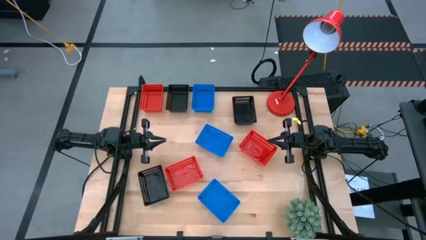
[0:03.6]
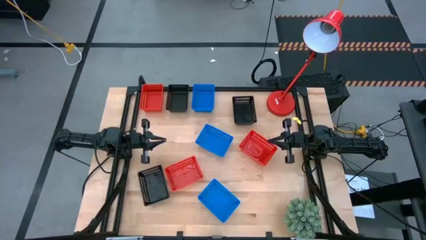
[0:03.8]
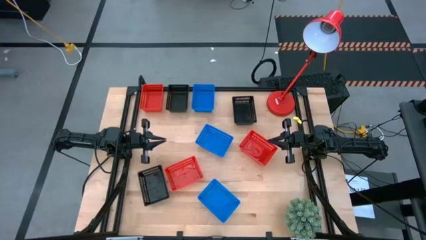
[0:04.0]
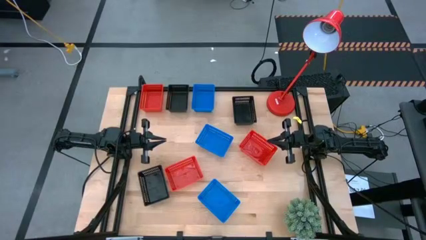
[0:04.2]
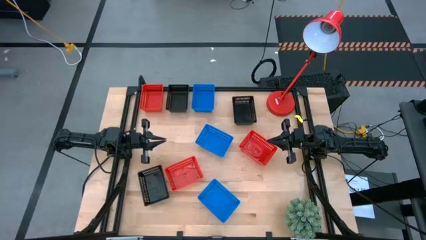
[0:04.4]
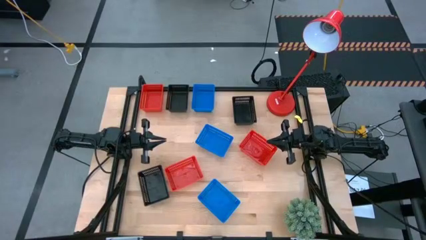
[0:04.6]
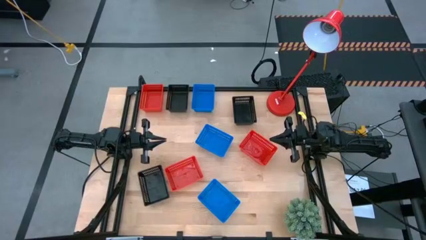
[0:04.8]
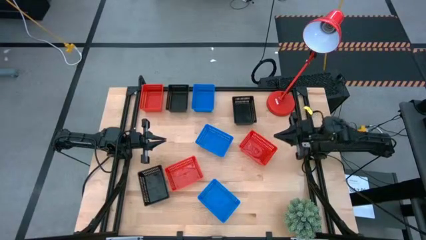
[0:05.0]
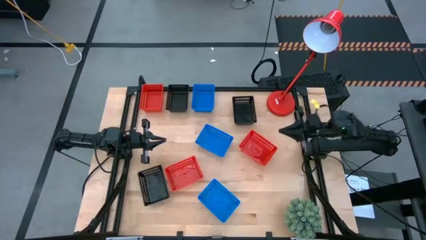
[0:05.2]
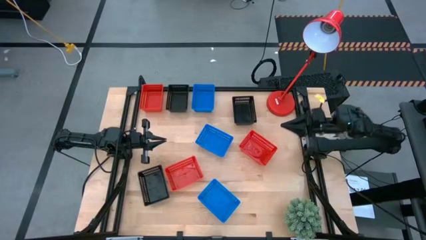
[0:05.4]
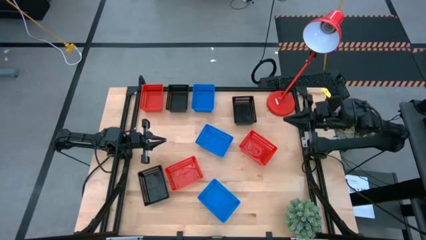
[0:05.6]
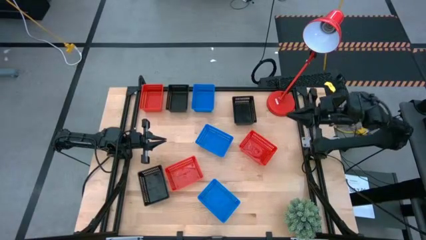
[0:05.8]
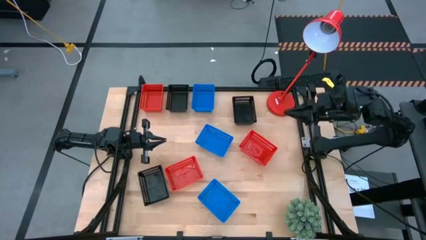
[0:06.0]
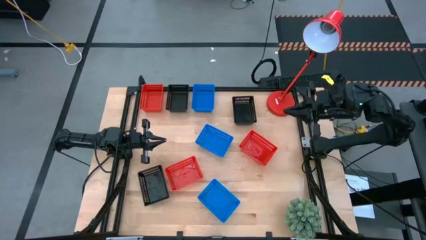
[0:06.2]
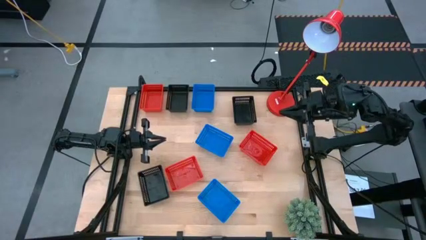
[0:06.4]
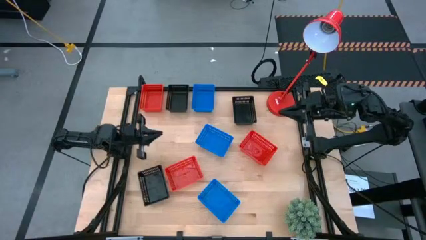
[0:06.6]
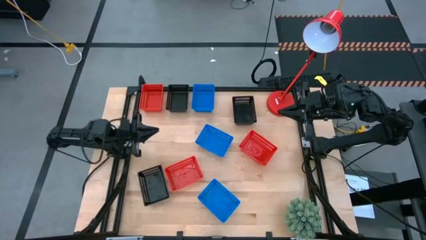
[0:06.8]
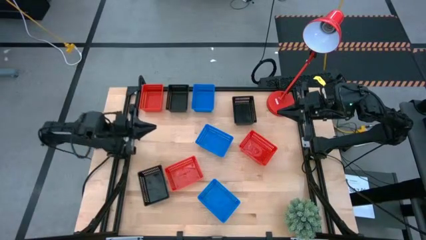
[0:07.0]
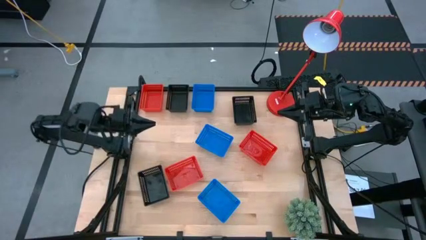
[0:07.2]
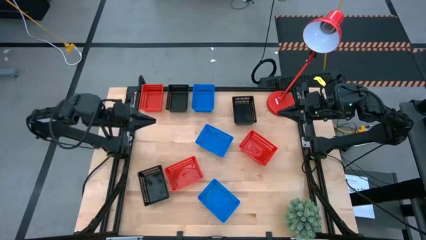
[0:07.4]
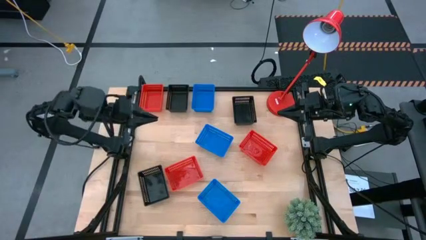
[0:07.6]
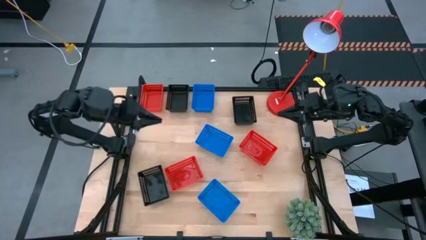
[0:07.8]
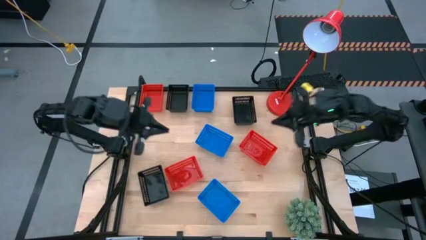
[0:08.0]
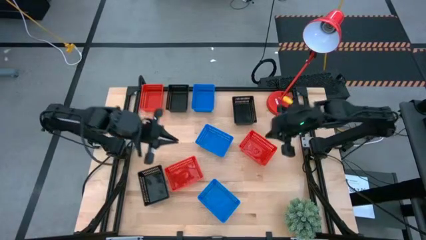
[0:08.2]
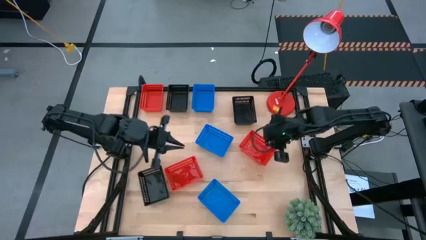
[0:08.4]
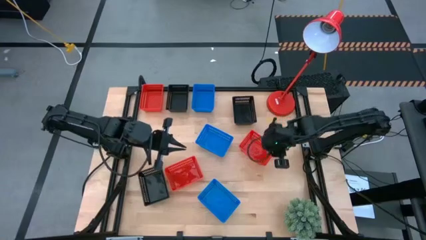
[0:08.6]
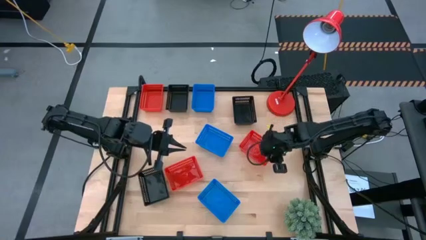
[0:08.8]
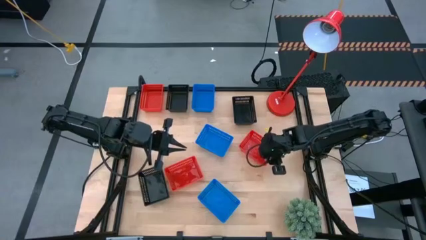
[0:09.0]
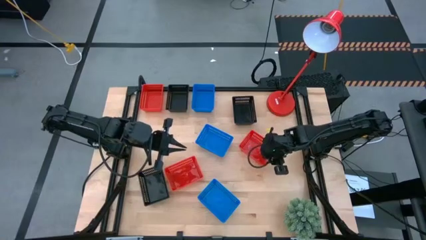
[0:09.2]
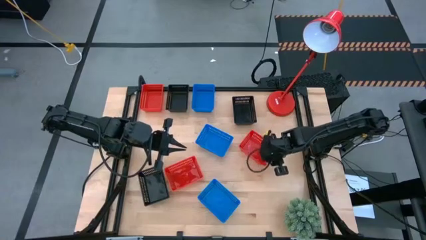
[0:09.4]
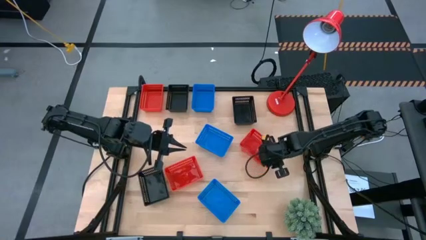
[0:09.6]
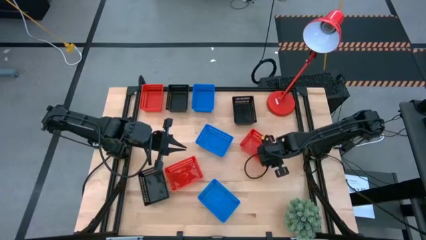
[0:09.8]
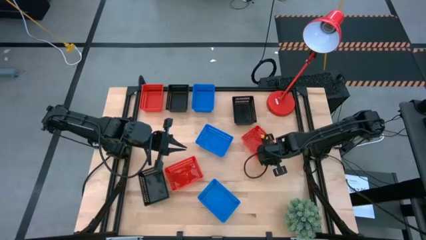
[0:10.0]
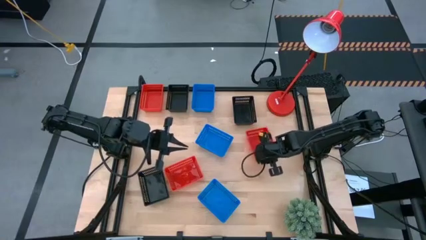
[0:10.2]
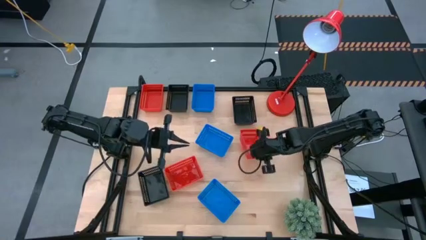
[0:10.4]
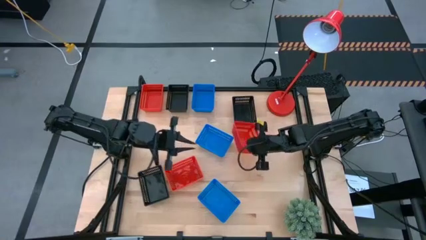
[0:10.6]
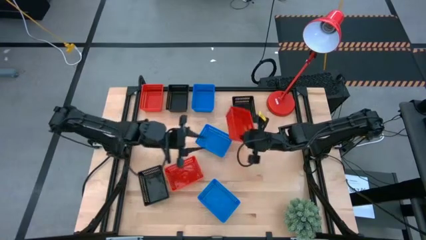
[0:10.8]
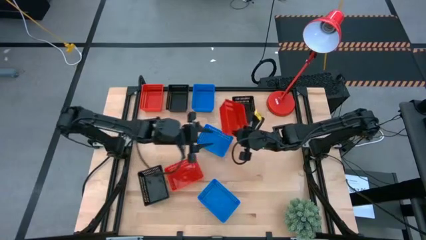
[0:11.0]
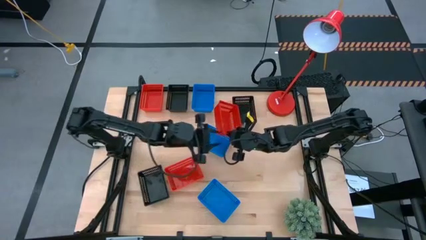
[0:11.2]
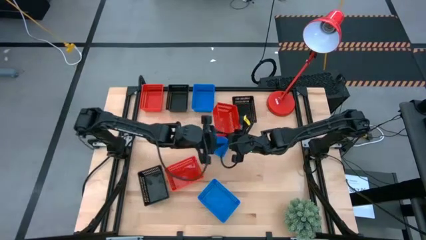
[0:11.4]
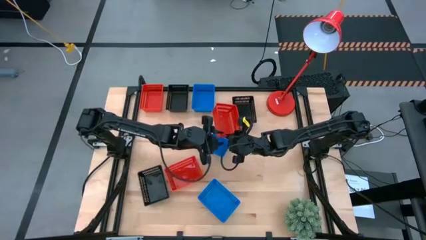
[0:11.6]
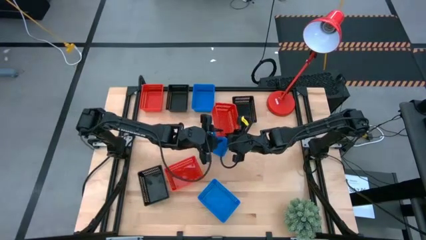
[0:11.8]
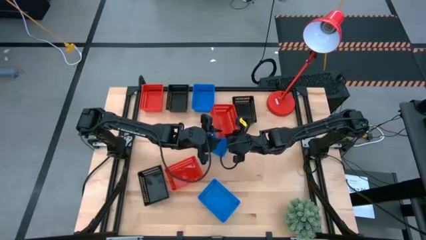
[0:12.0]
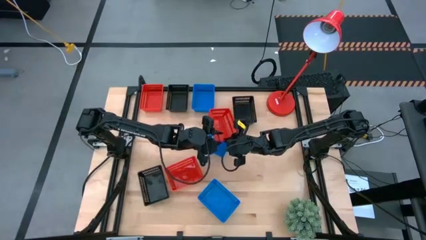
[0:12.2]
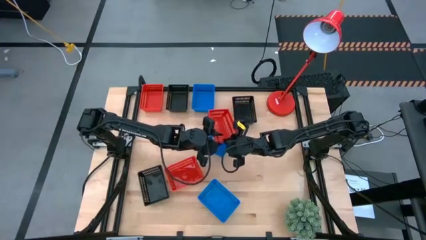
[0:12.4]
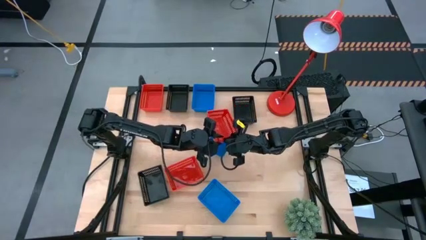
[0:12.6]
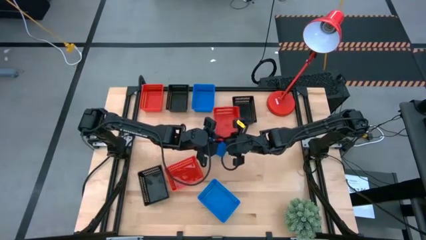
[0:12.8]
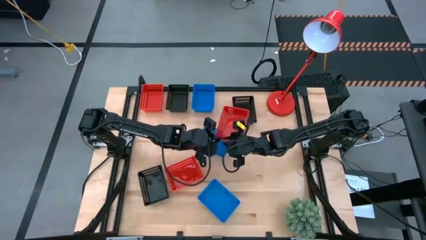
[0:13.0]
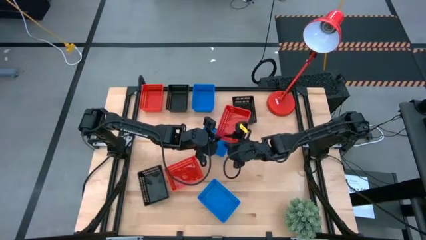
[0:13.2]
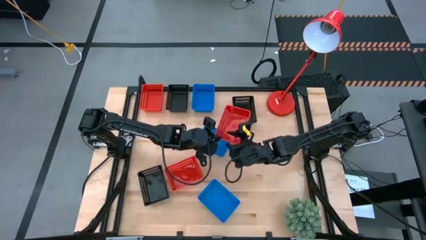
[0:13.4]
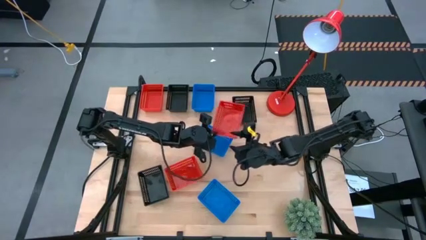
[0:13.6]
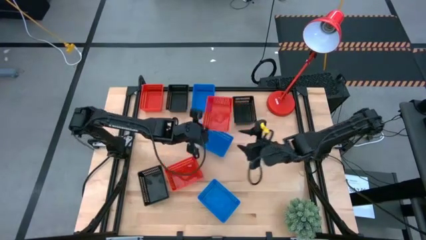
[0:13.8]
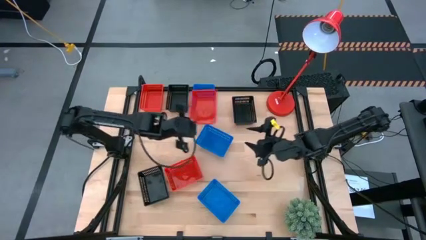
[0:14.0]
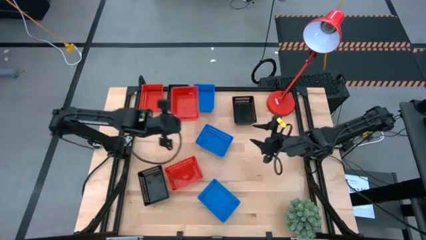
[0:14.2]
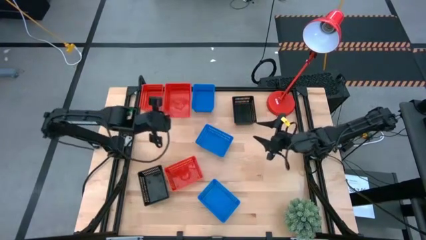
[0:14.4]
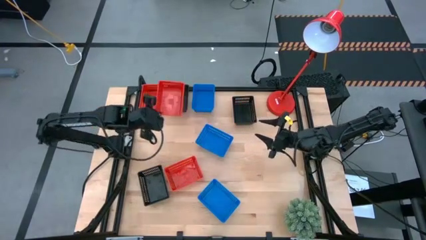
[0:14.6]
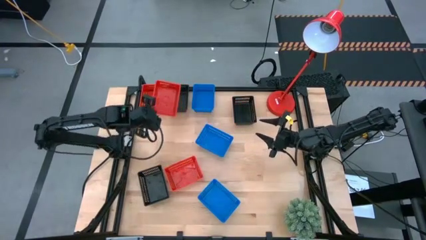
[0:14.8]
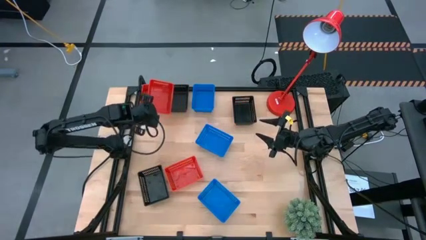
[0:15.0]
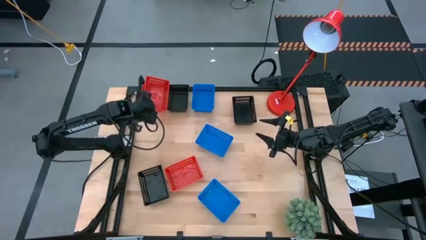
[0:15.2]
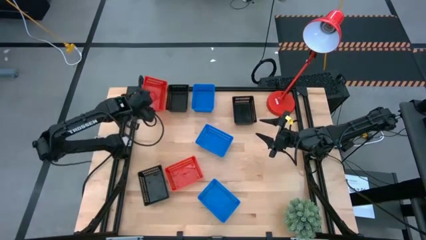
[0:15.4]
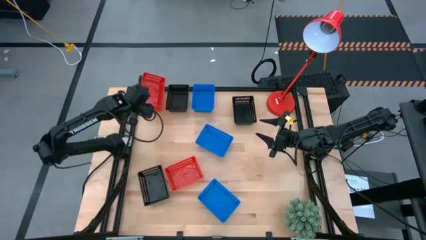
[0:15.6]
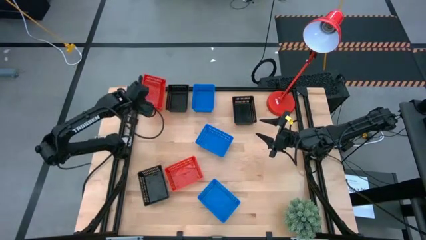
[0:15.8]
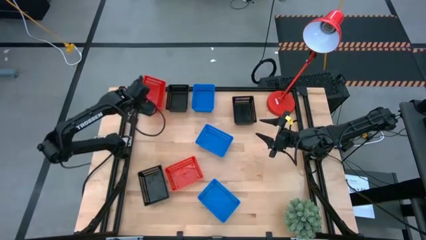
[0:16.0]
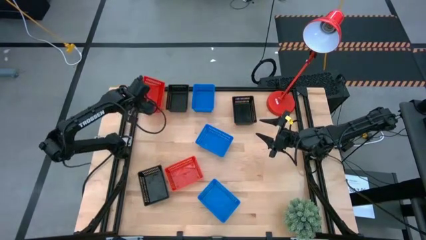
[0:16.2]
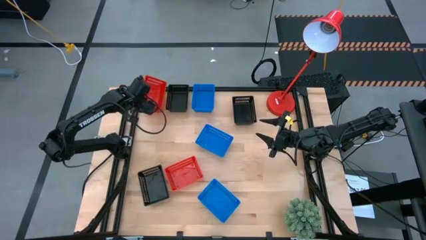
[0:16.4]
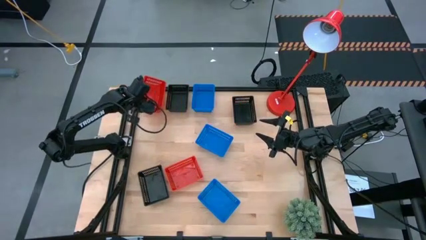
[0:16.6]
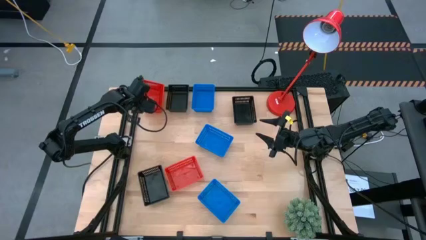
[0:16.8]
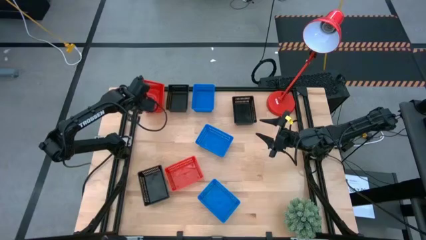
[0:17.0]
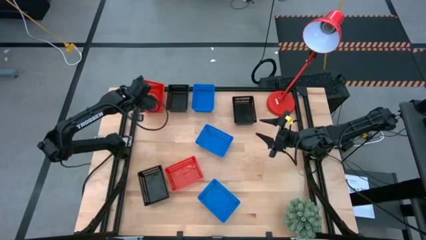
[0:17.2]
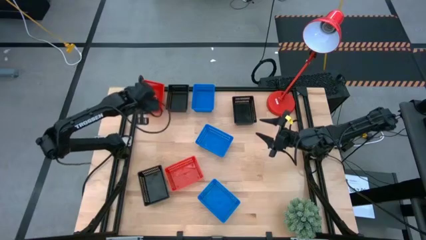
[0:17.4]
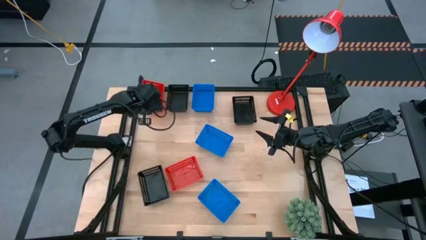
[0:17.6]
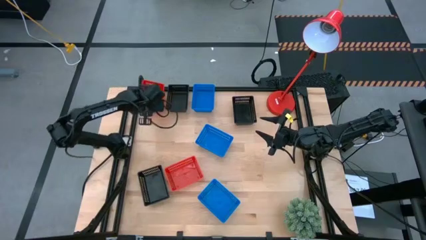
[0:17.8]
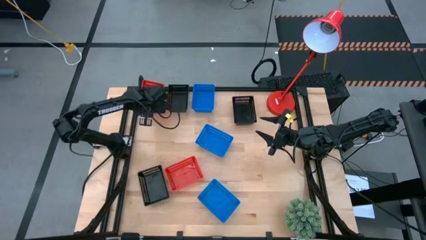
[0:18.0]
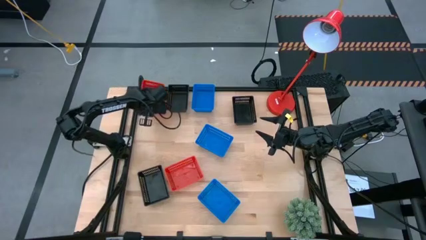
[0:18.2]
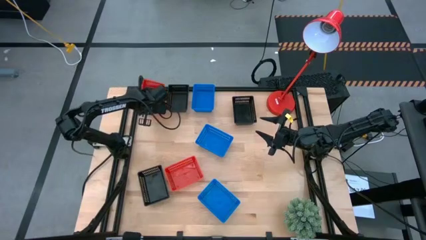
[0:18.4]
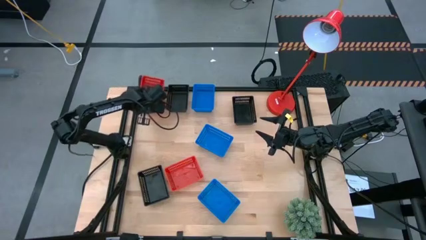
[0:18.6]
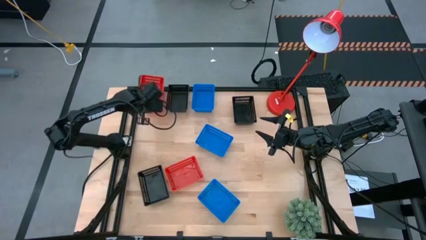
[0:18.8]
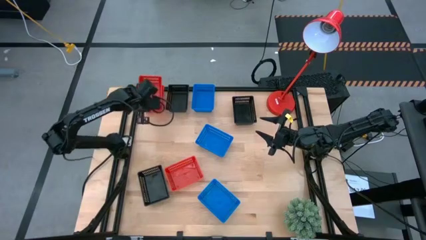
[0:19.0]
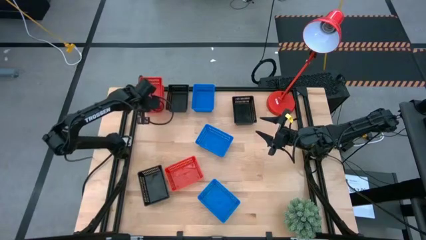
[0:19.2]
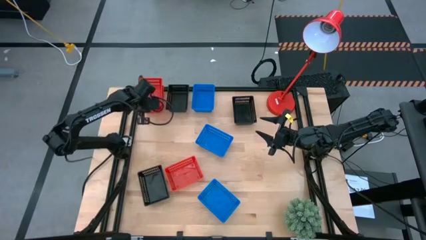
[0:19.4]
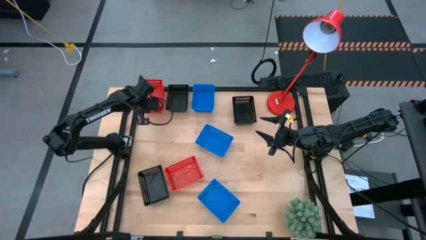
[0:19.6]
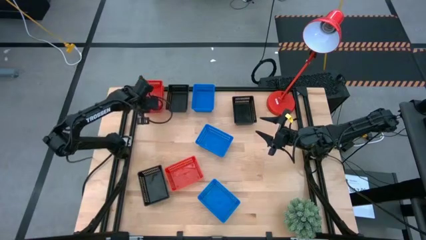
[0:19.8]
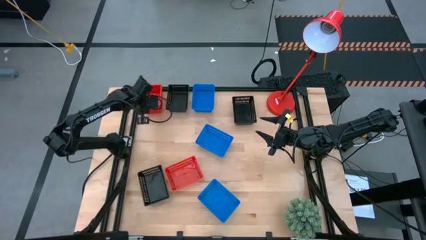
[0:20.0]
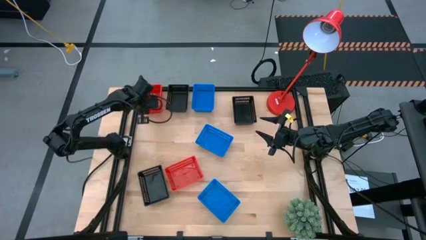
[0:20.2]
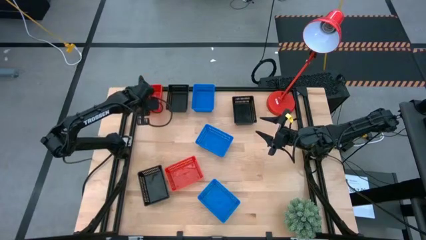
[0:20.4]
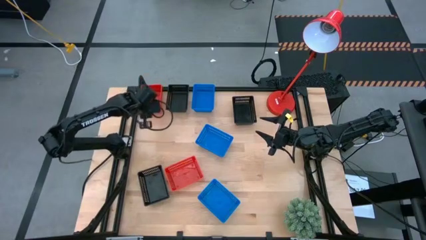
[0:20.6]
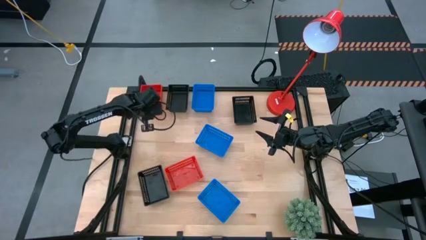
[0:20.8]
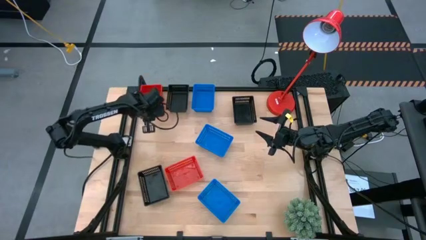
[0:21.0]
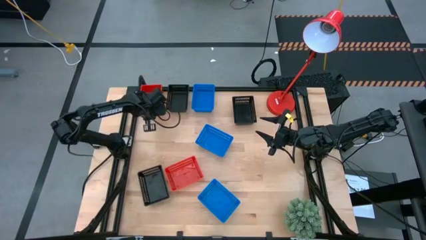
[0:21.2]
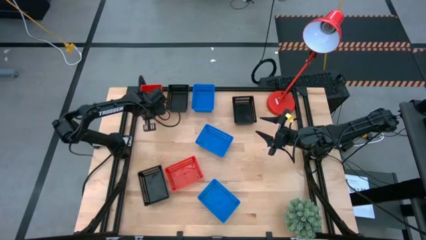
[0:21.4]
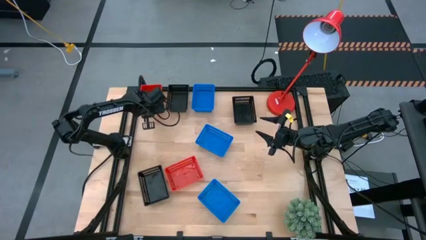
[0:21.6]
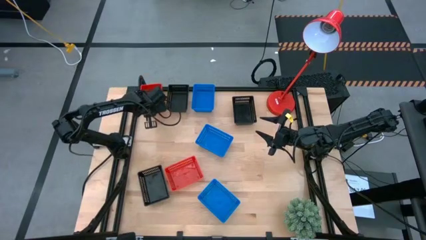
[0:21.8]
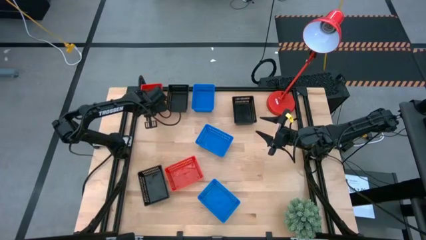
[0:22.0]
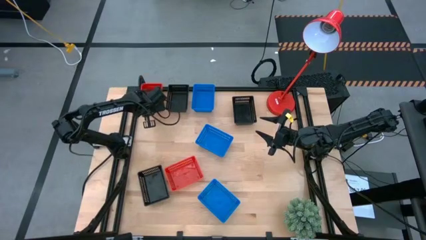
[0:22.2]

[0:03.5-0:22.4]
Stack the right red bin on top of the top red bin
